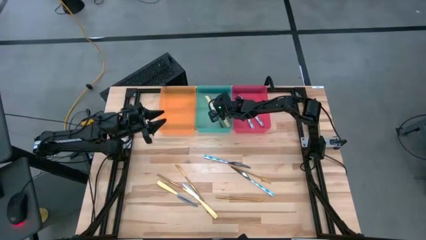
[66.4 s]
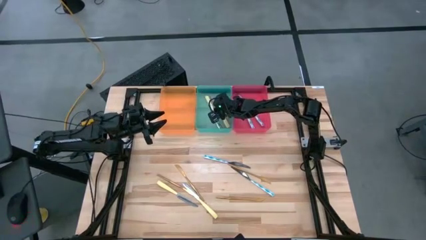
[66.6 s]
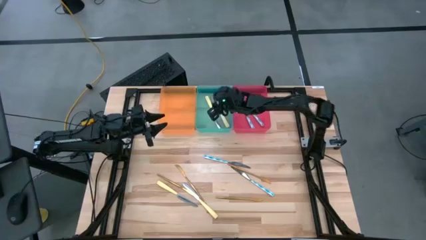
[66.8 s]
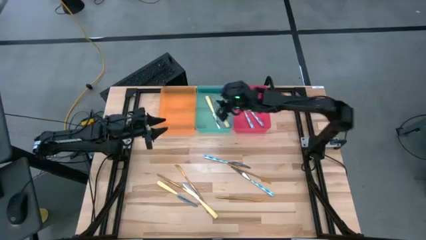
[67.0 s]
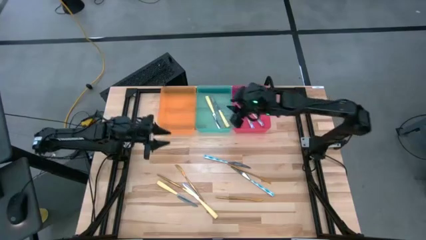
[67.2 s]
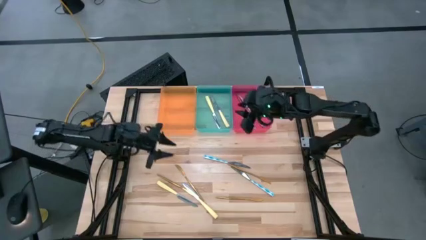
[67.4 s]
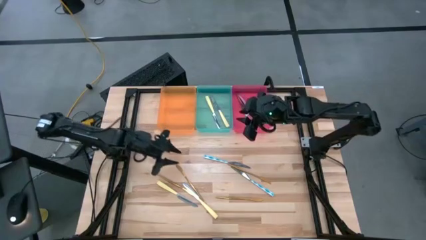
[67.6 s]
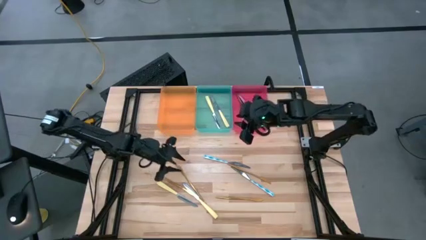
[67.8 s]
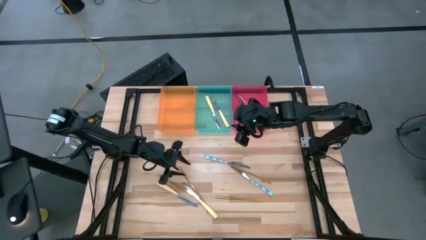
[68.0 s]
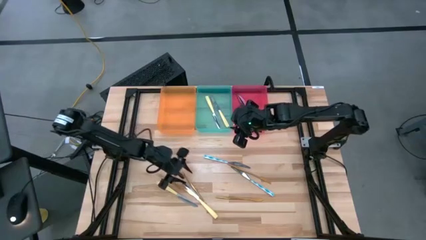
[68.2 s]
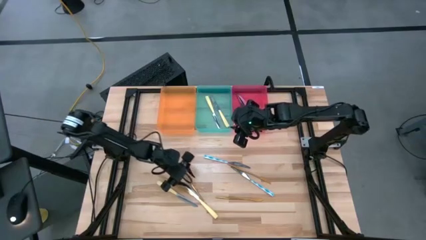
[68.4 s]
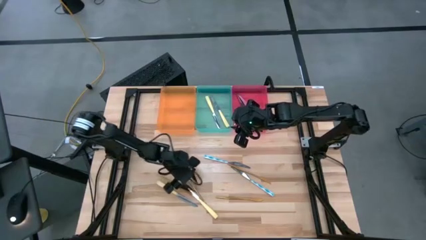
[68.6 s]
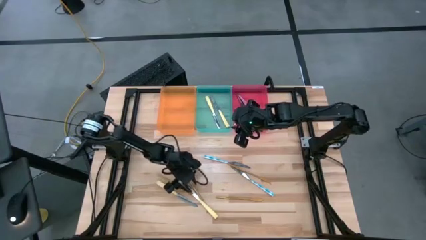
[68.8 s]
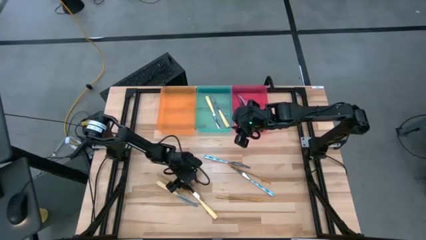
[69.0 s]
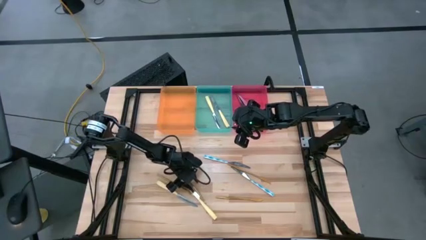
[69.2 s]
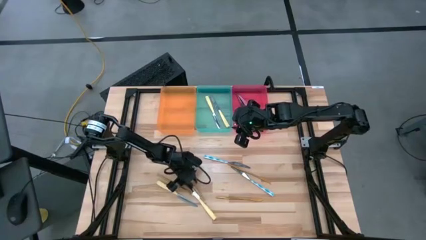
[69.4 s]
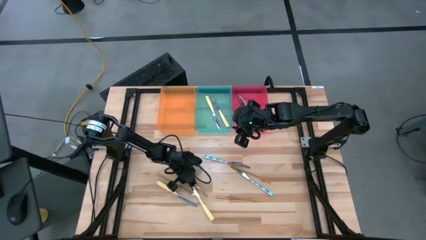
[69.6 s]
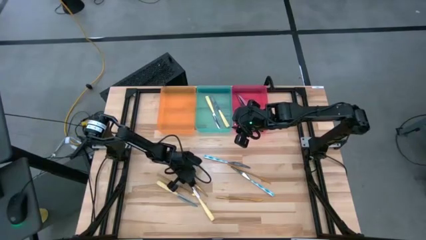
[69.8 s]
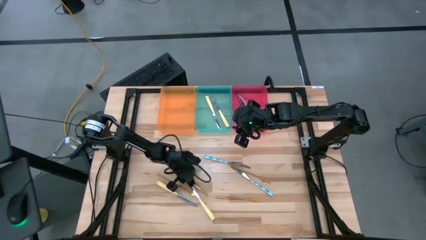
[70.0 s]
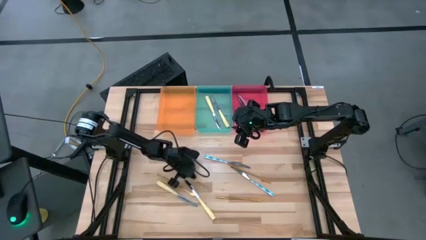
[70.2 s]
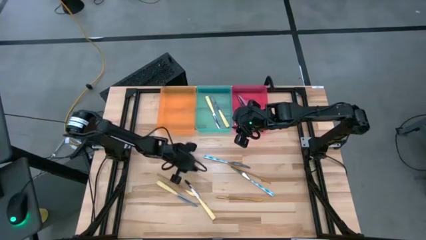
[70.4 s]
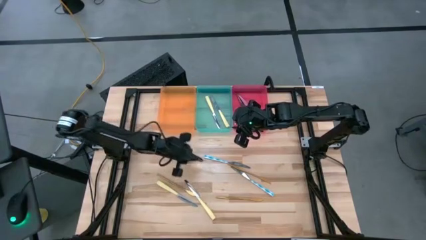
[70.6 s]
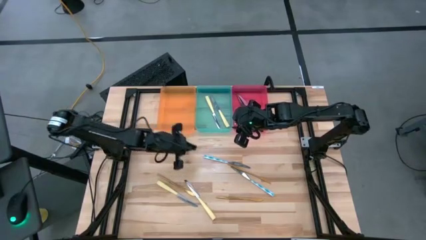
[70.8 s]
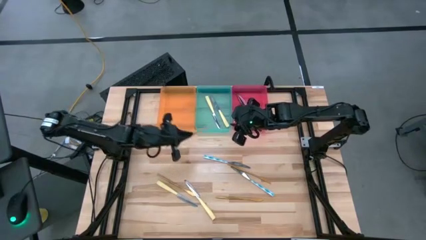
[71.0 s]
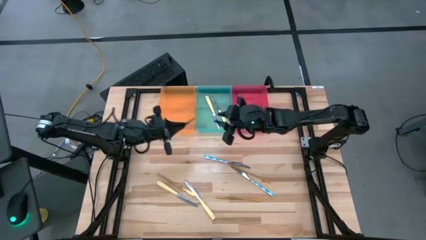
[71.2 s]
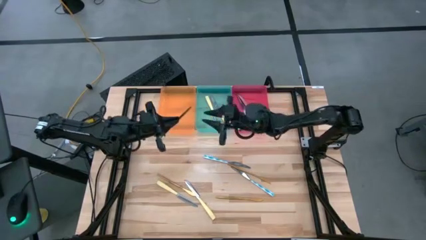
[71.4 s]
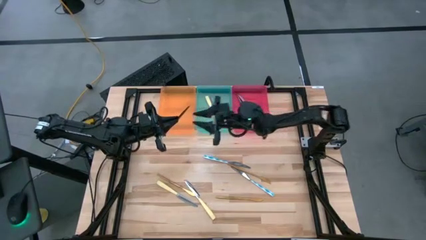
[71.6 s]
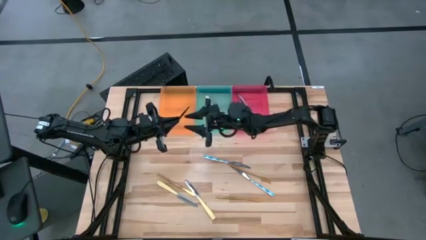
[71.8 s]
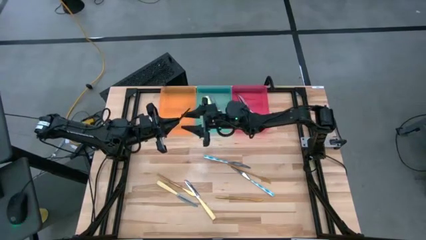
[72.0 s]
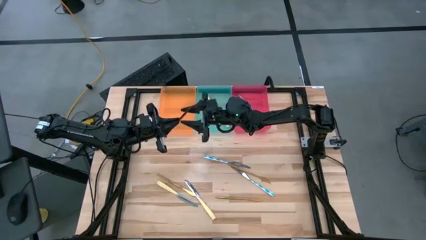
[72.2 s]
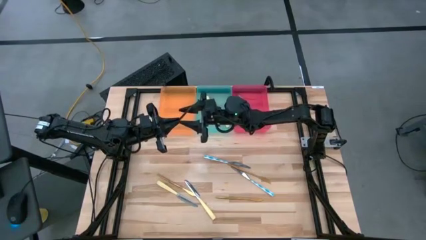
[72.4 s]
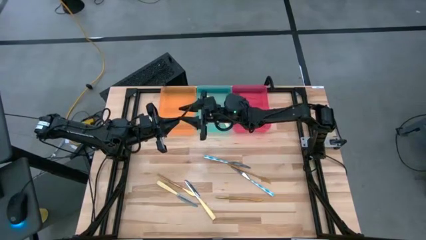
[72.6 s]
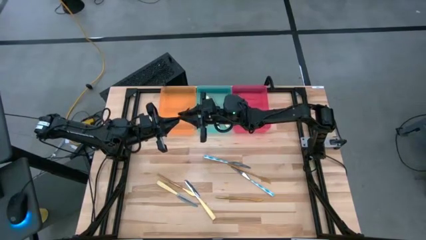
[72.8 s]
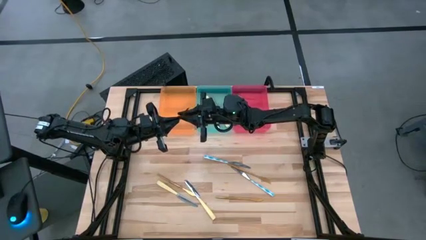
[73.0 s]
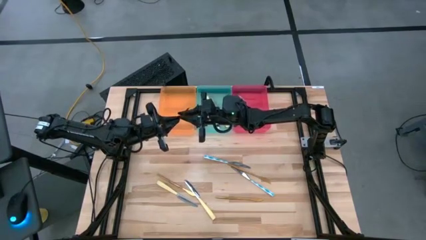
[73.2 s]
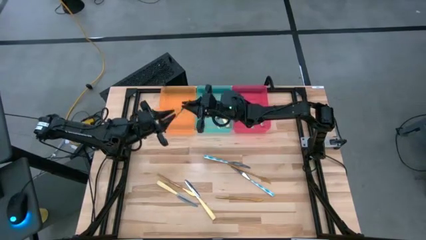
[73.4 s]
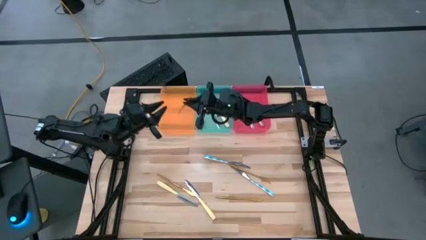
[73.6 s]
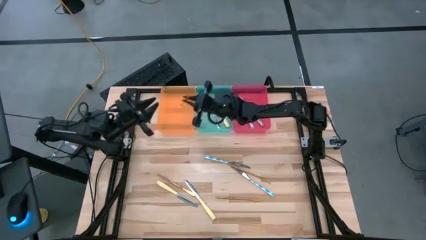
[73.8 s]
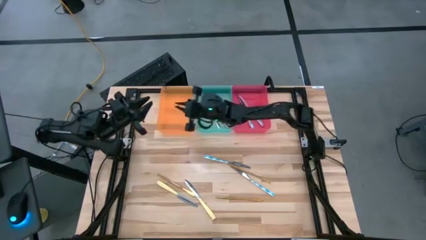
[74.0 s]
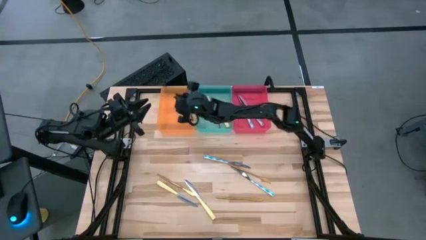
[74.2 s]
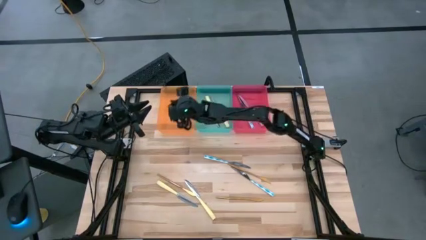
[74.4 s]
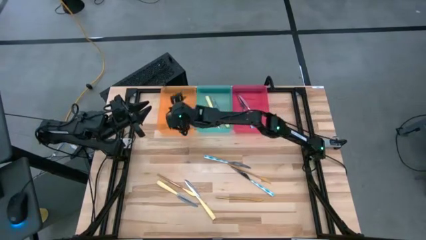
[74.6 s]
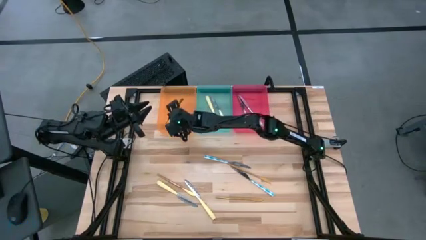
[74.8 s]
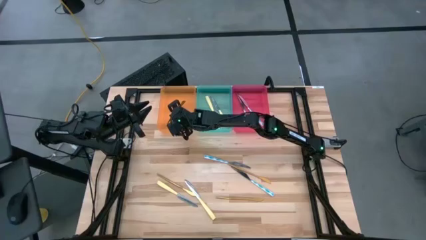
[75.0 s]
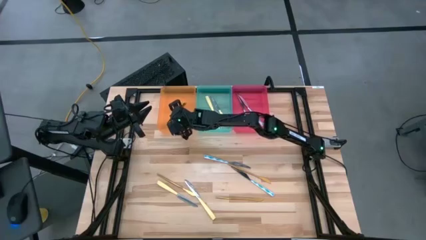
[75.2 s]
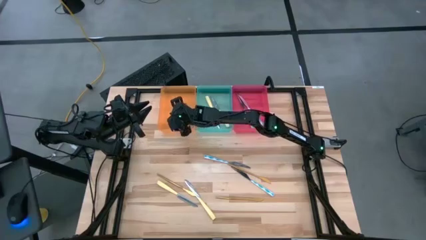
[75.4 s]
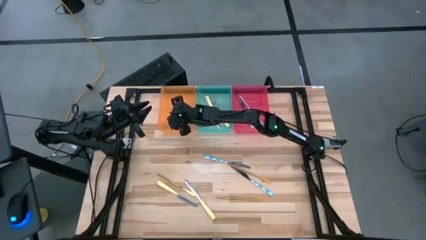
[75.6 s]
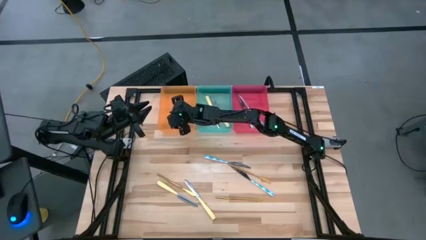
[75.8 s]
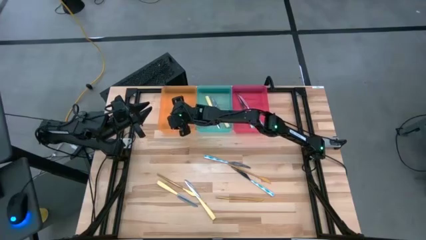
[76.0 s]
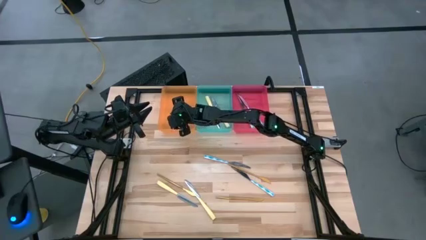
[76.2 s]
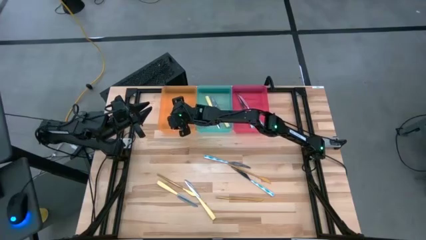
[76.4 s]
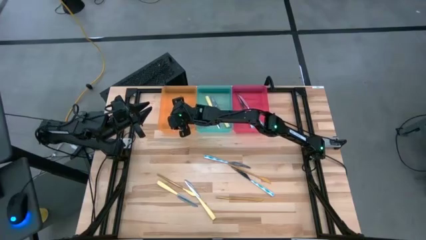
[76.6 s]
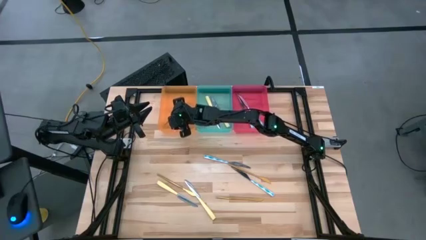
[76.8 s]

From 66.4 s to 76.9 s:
Task: Sort silverware by color (type)
Put the gold table knife into the orange bin

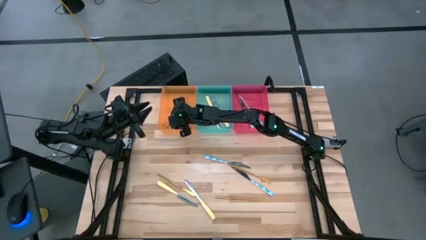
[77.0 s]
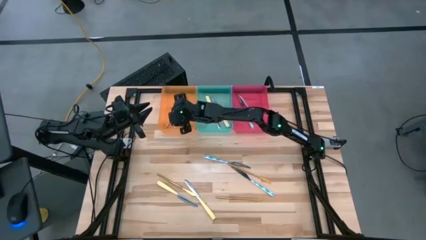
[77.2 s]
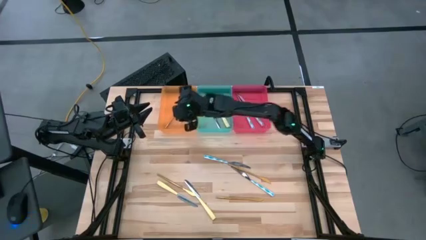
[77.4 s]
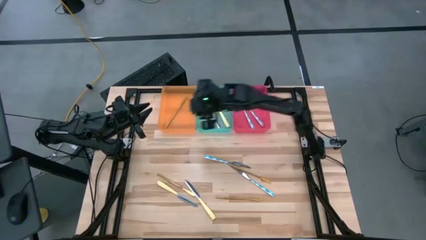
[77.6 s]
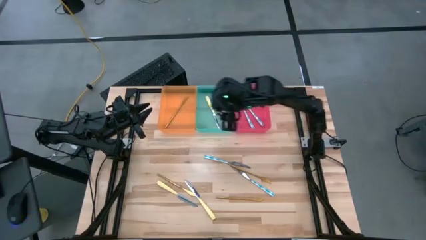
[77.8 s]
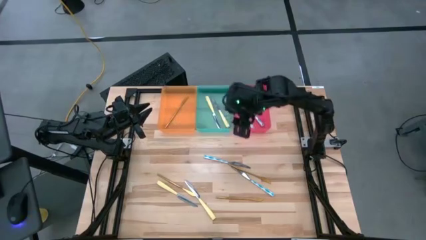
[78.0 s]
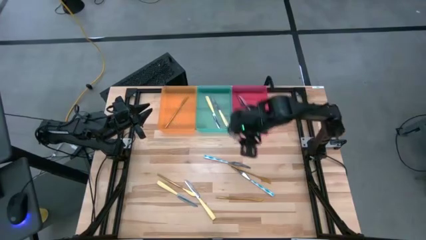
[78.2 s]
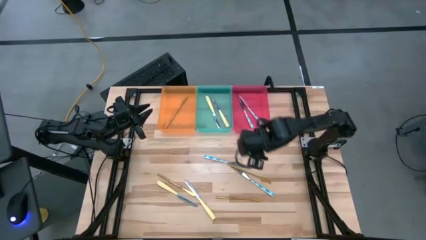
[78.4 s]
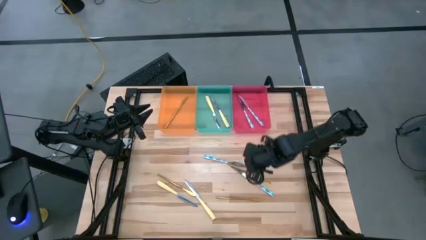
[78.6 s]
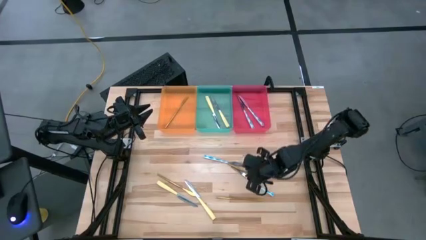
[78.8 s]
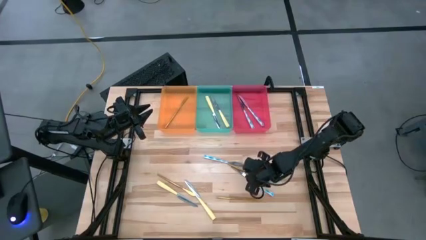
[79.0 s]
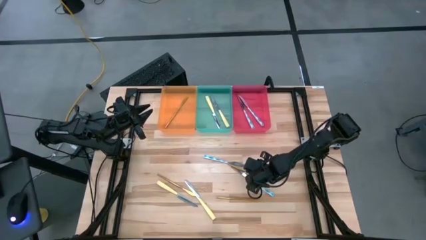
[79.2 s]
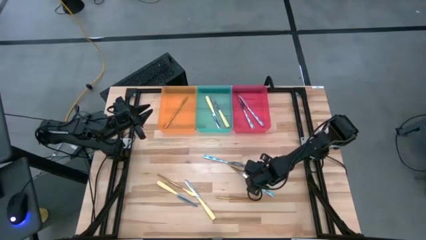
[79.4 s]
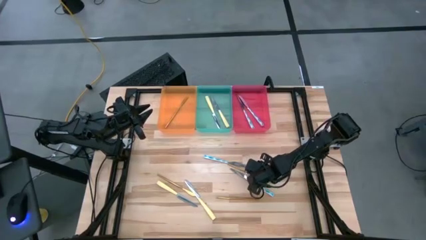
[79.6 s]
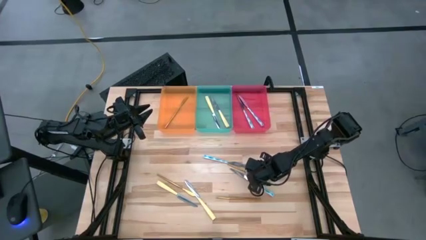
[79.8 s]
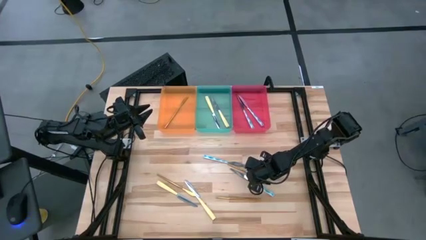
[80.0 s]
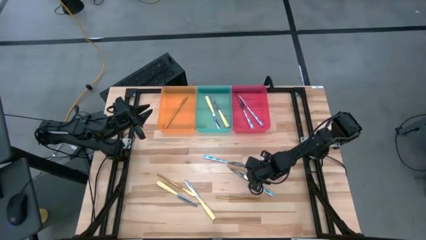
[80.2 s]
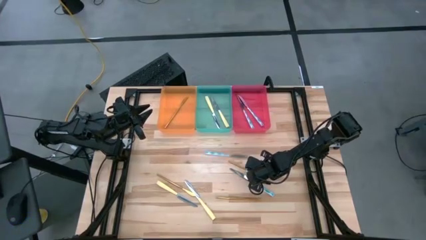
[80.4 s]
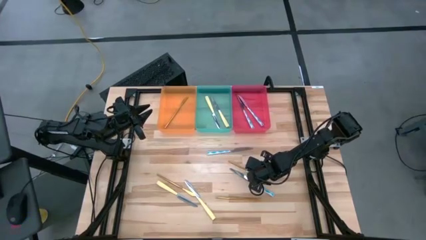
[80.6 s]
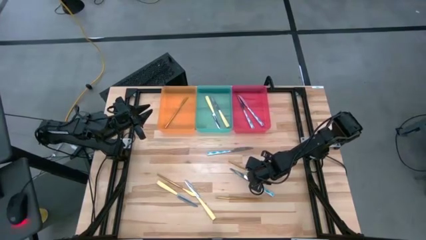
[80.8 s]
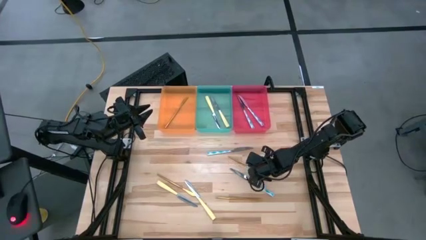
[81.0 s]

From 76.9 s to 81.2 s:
Put the gold table knife into the orange bin

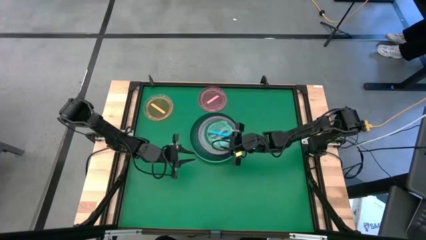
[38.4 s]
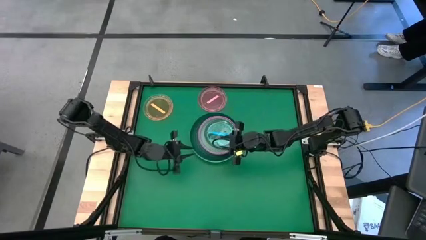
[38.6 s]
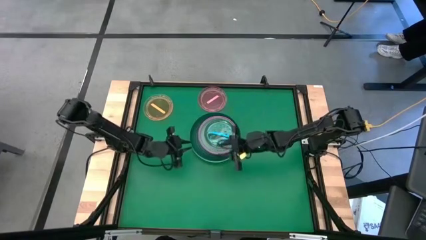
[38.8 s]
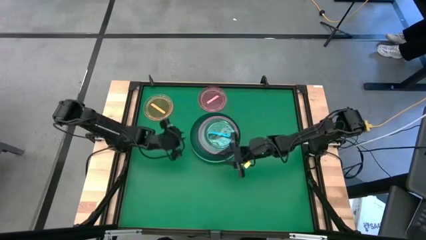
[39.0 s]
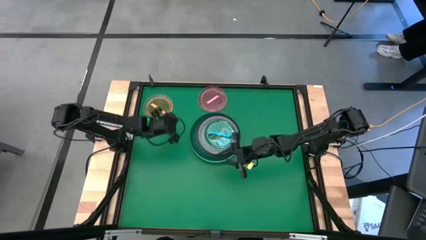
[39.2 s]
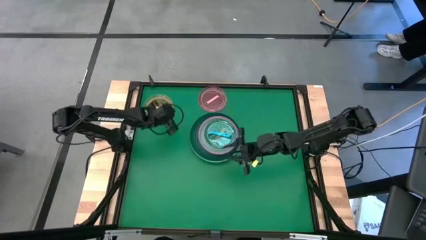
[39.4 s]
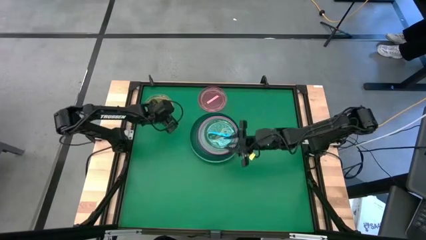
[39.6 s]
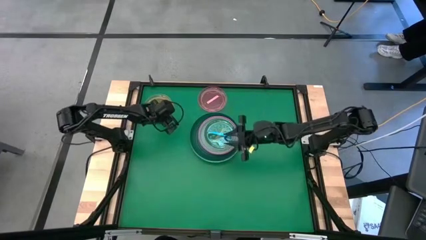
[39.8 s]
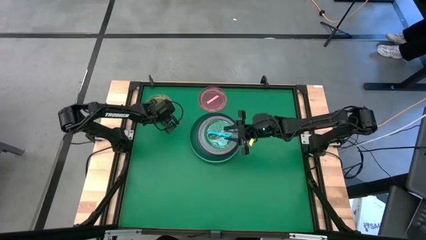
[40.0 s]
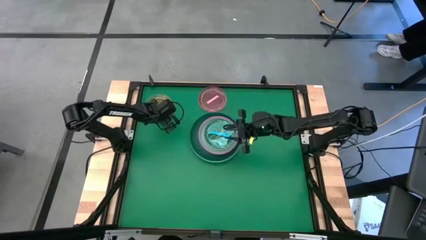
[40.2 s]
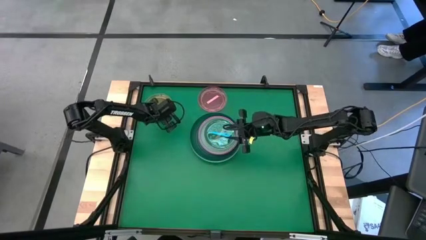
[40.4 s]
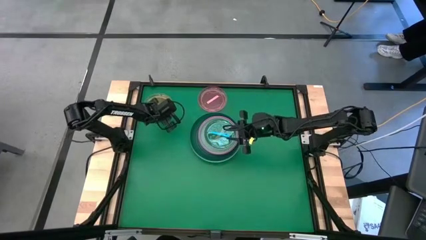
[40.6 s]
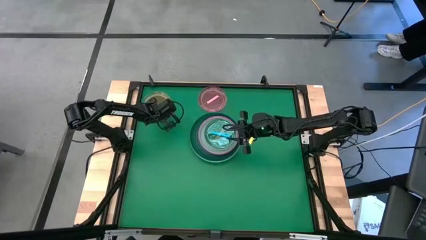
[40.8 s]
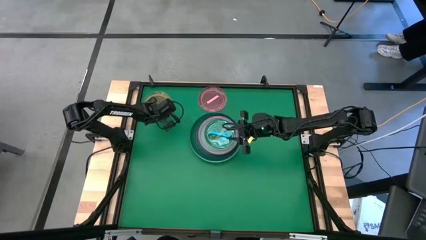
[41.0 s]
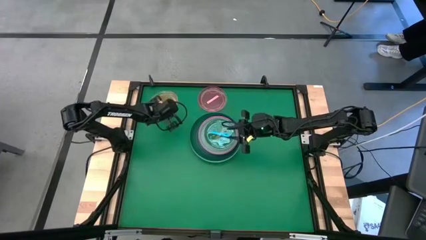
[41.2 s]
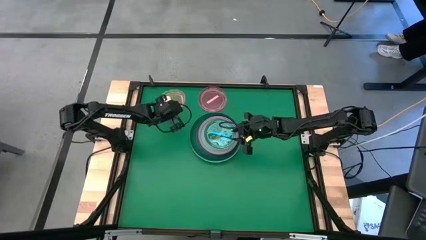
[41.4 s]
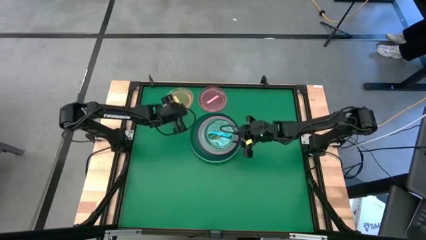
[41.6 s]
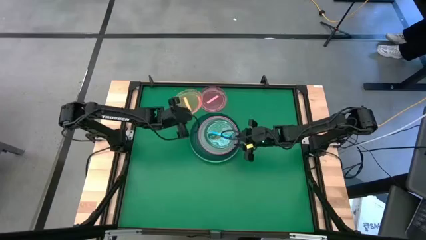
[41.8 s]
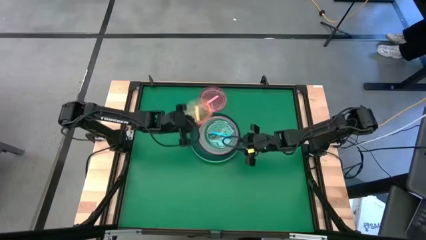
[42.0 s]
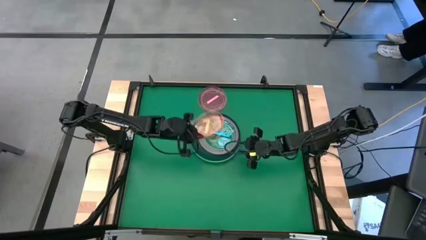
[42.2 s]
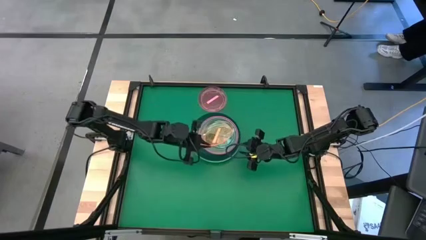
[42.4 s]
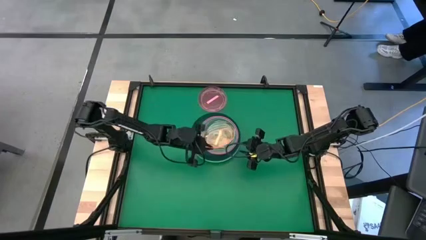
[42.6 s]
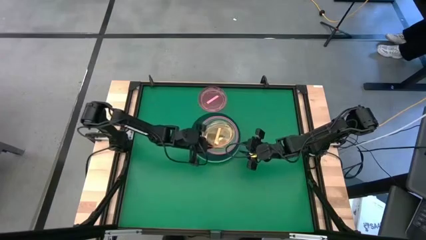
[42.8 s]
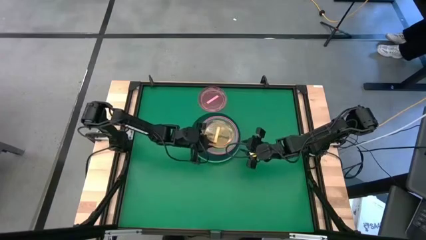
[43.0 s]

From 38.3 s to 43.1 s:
Task: Stack plastic plates
Stack the yellow transparent plate on the blue transparent plate
